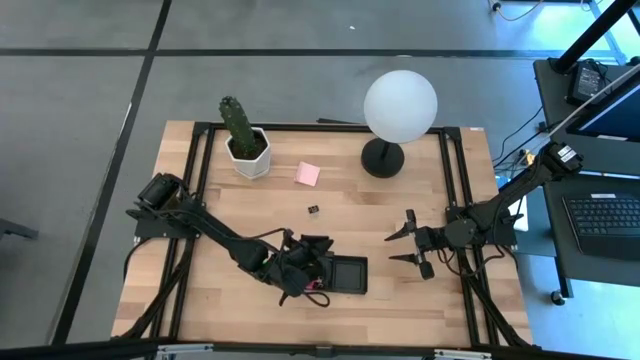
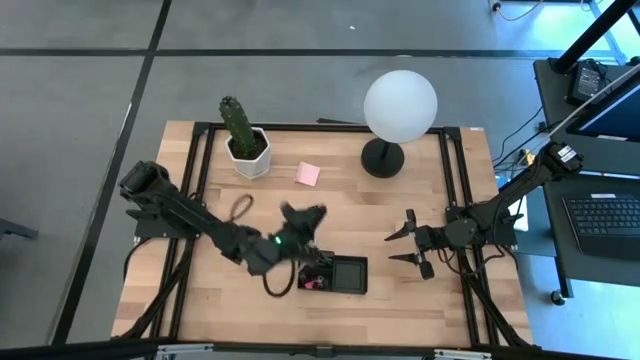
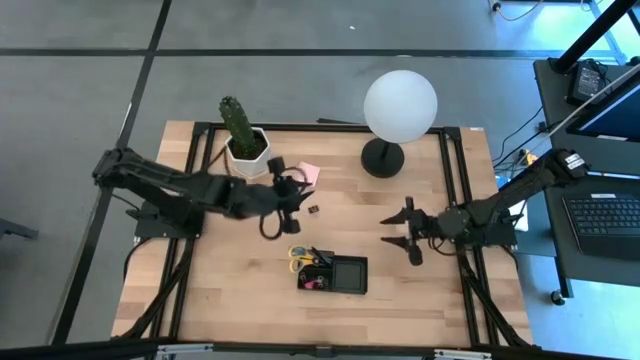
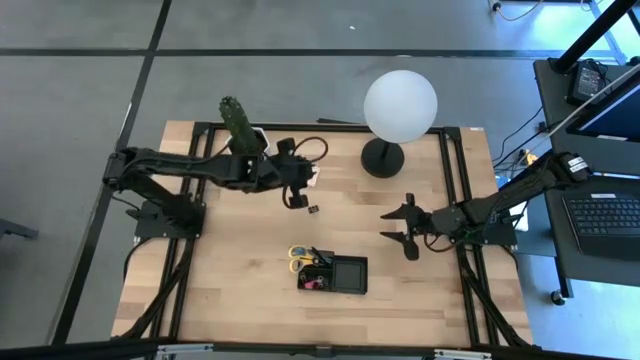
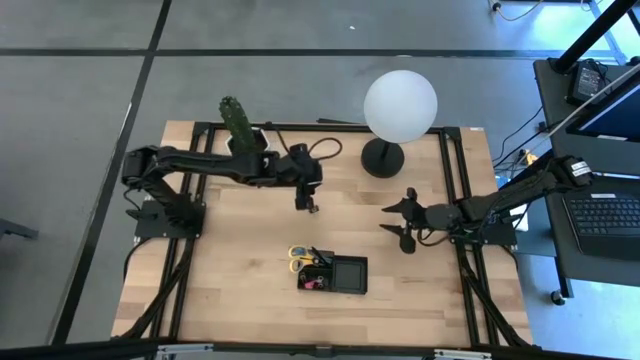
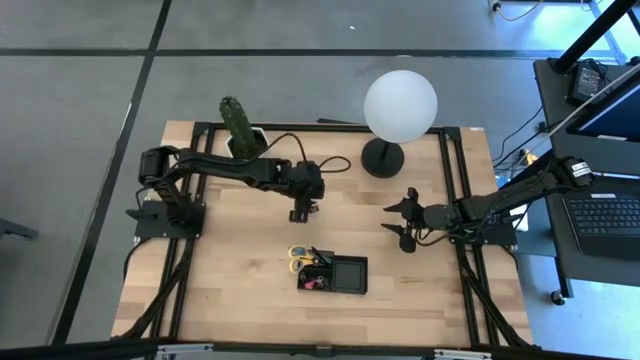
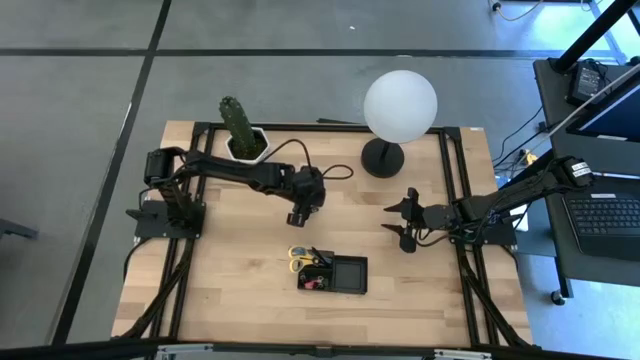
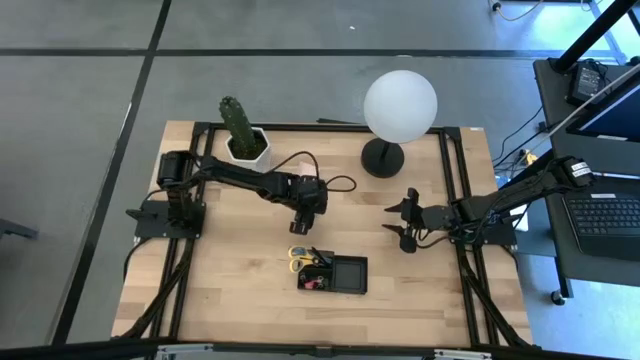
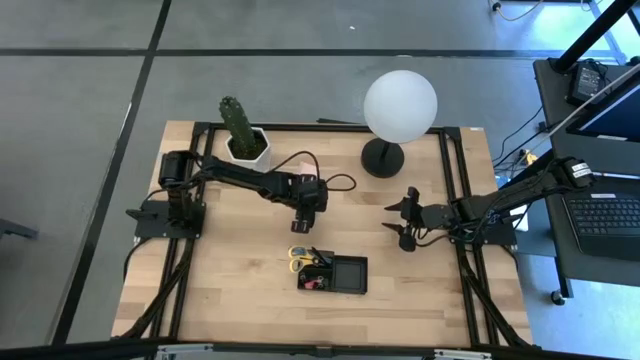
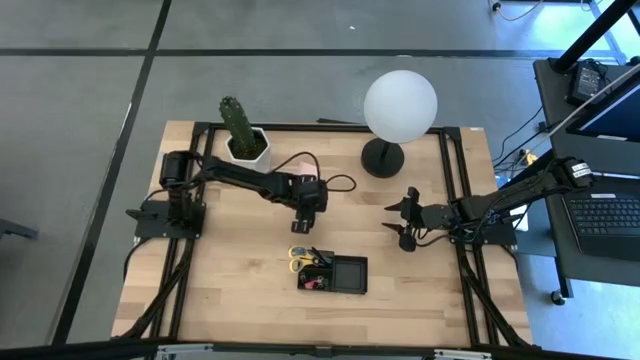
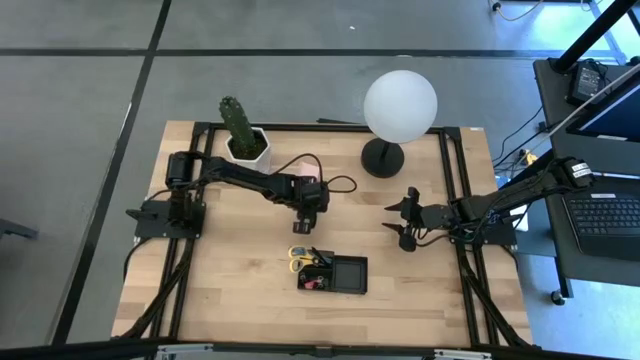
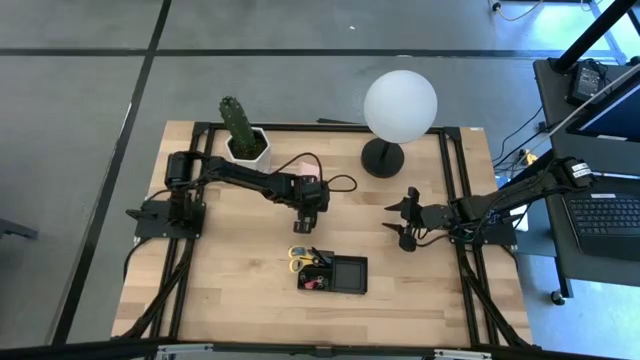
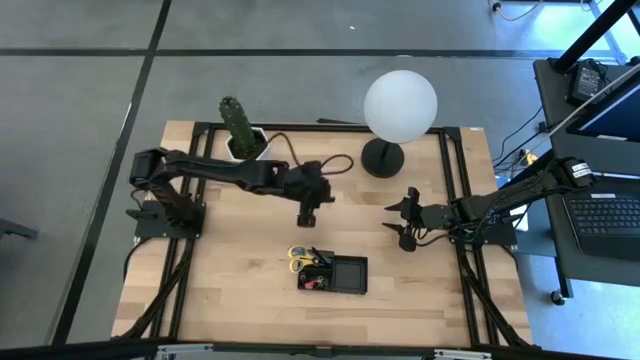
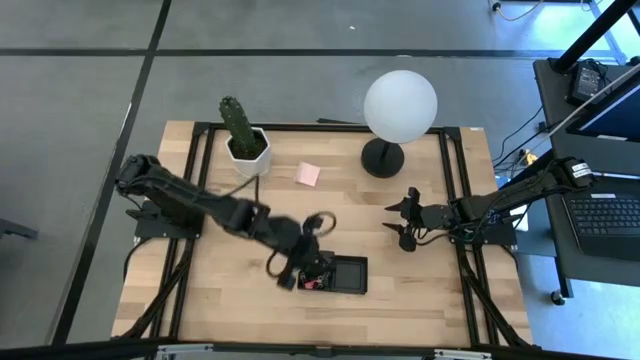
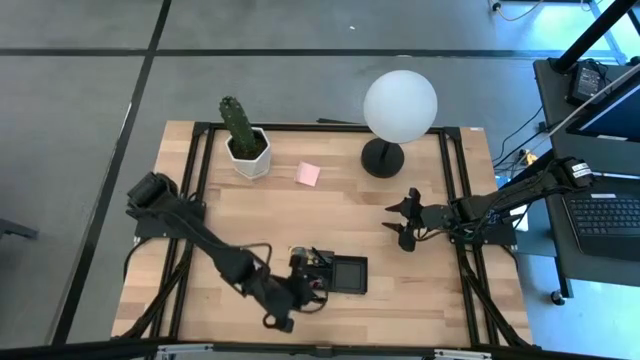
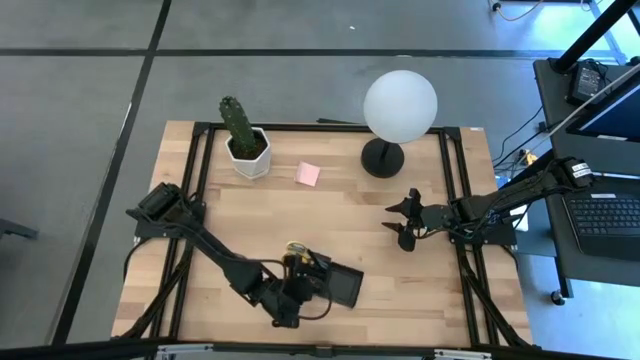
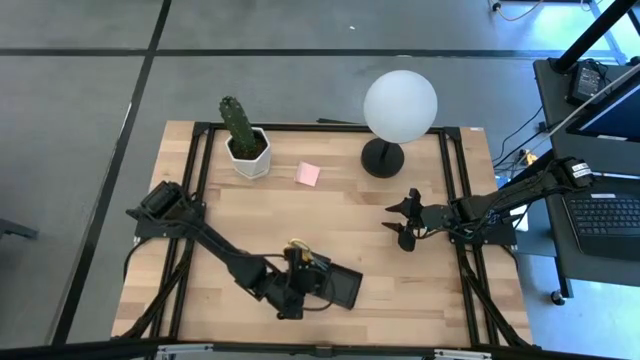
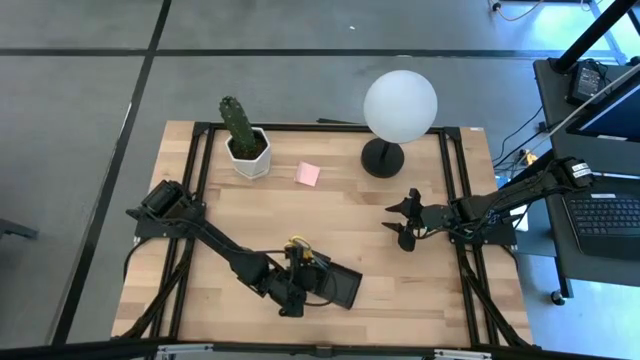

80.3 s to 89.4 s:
Task: Pick and place office supplies into organizer
Put the black binder clip into the mesh desk organizer

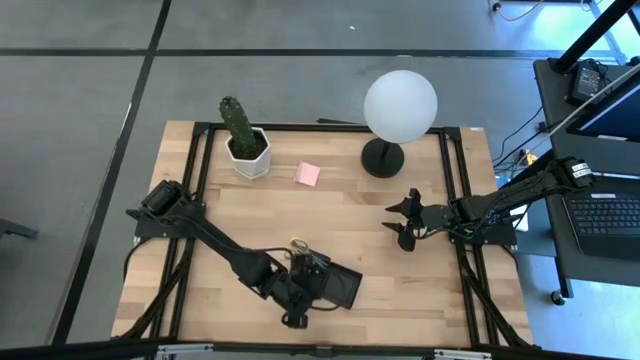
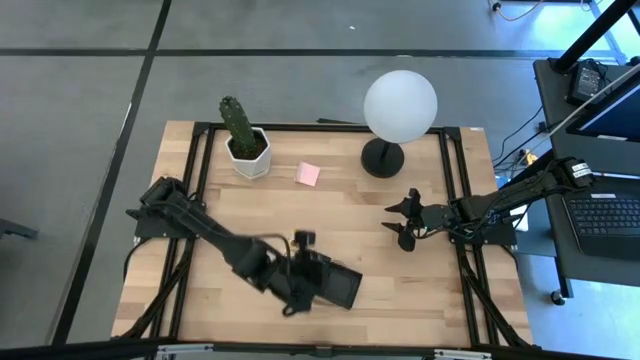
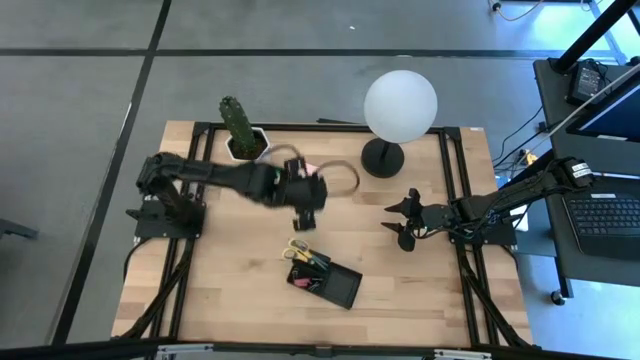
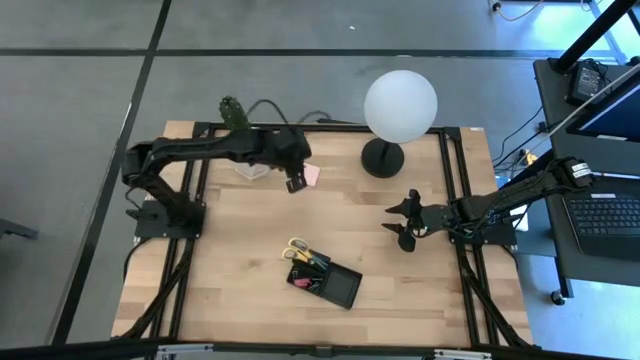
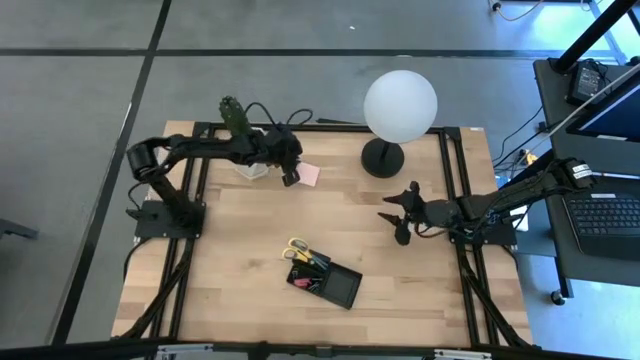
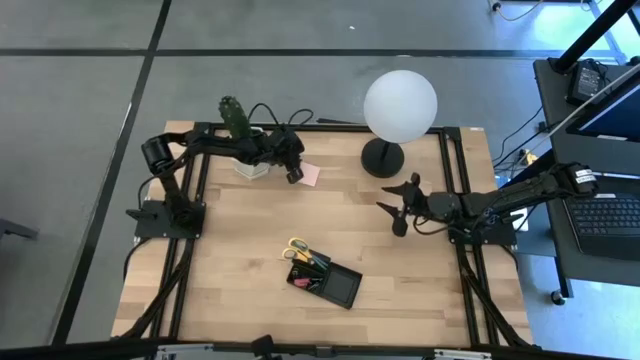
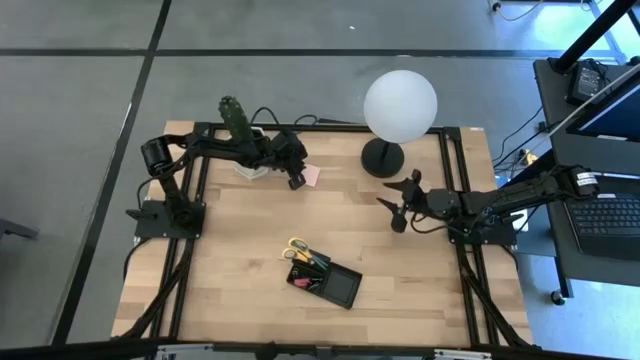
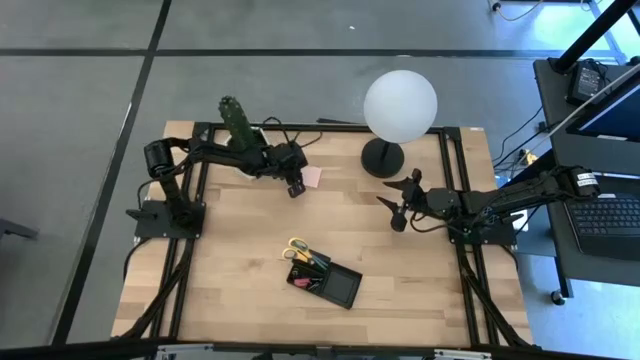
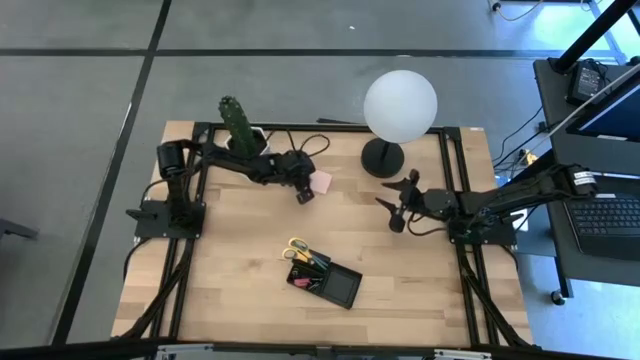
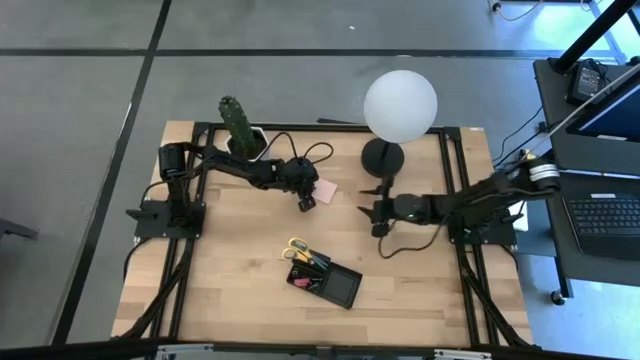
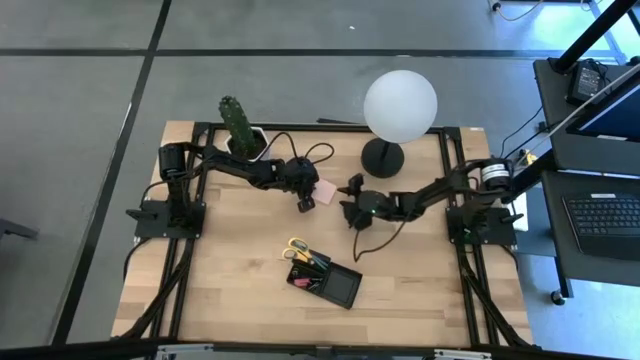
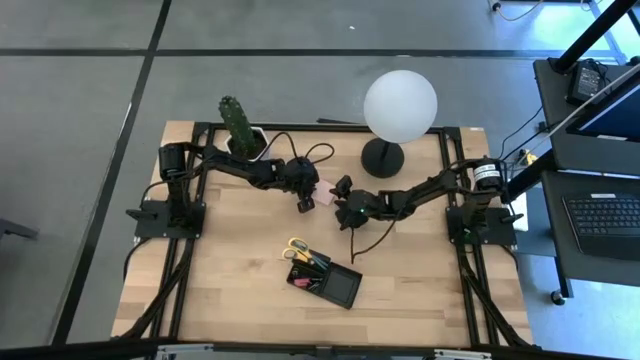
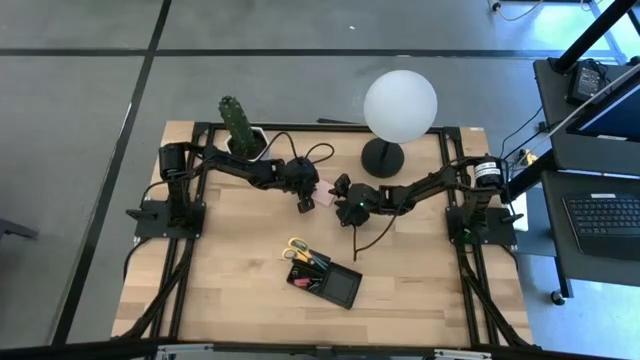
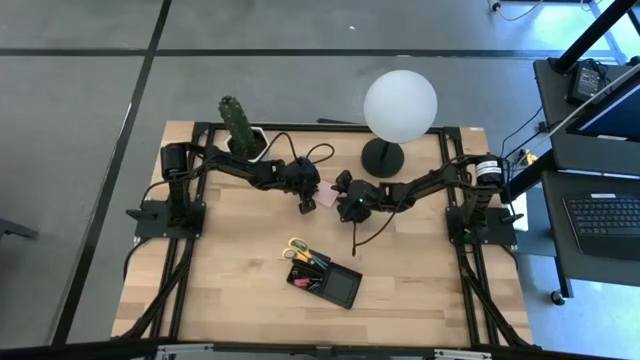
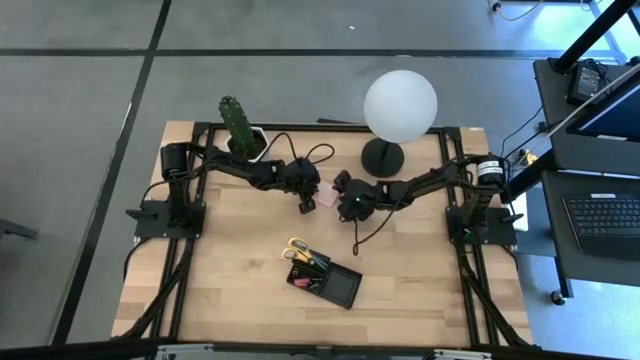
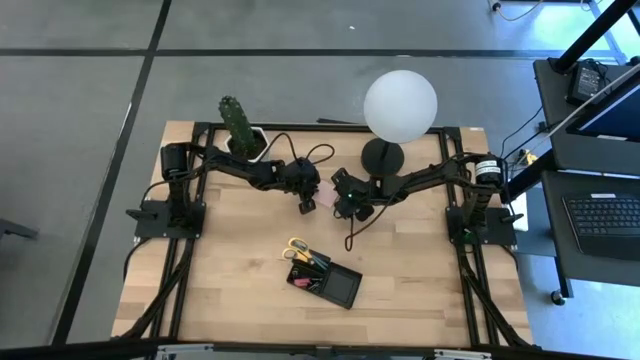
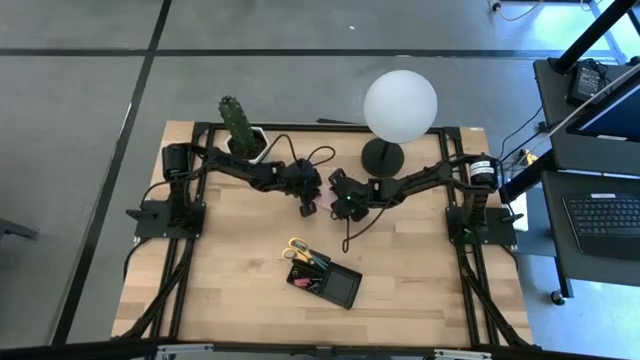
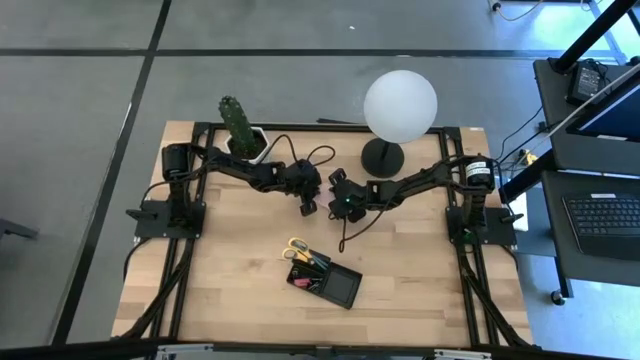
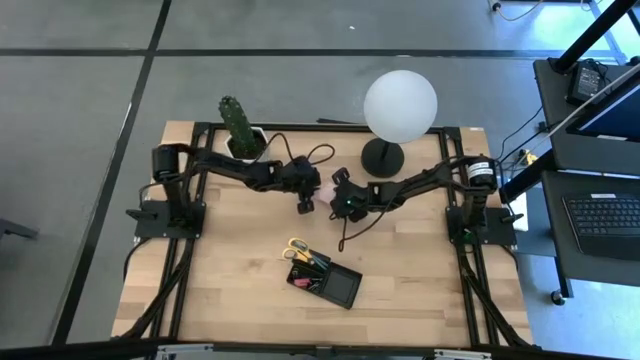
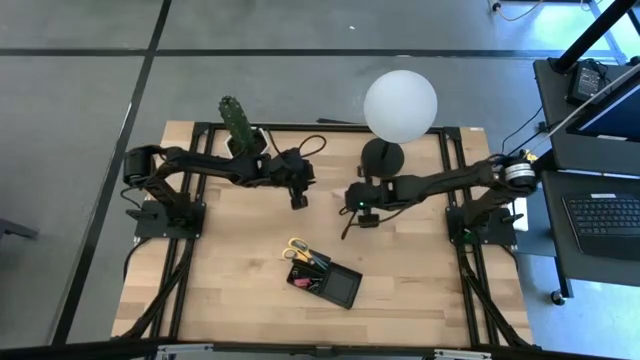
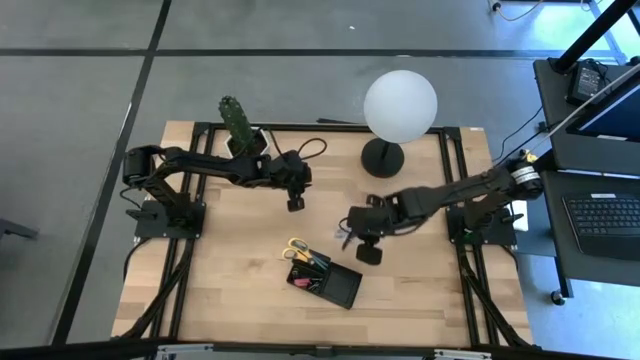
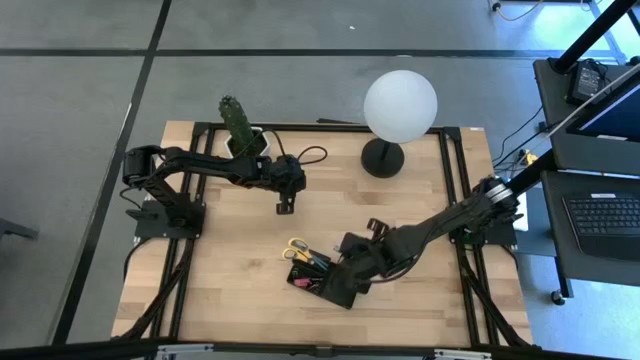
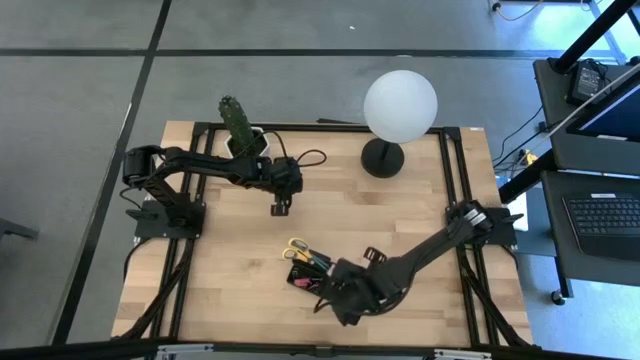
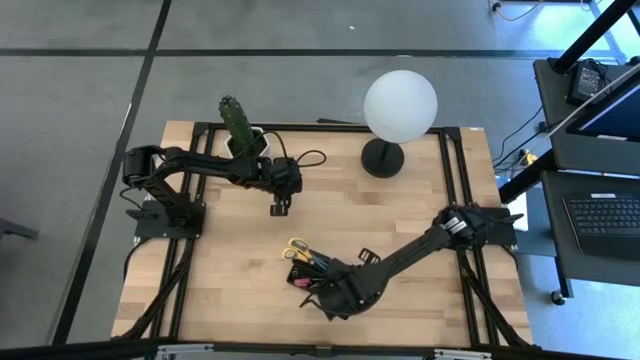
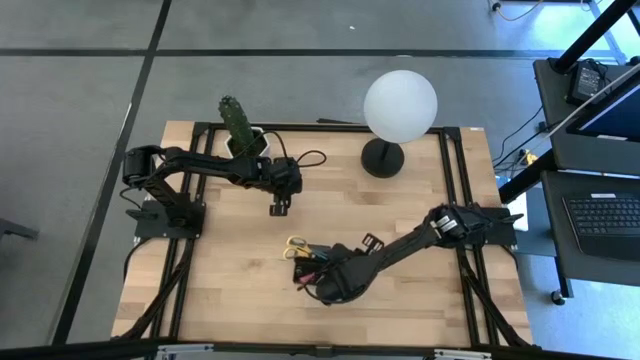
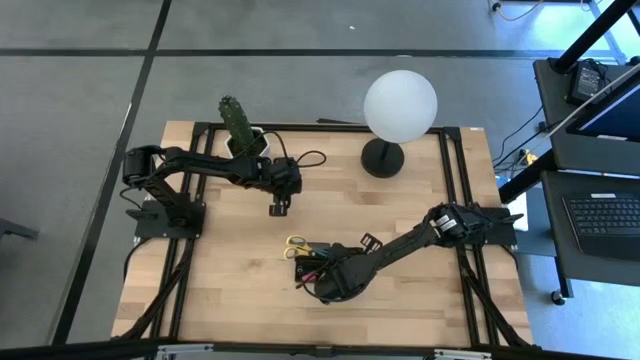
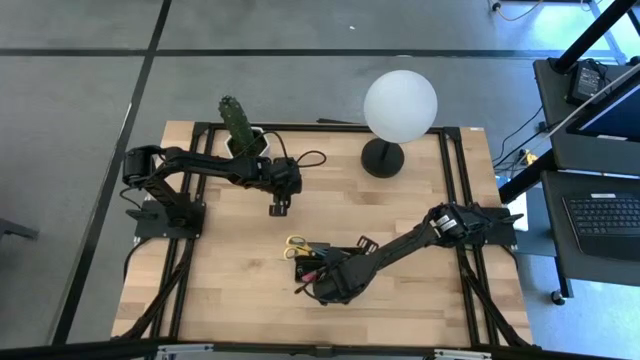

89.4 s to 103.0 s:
Put the pink sticky notes into the mesh desk organizer
